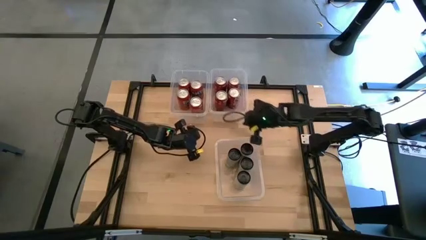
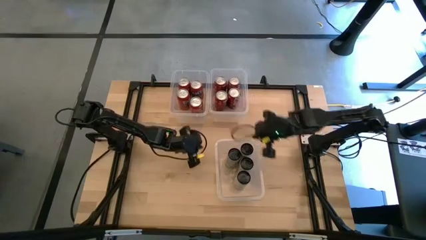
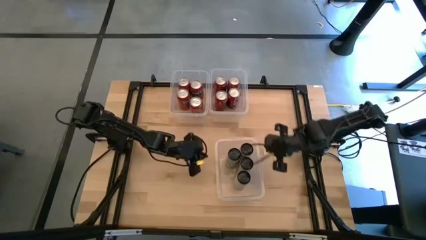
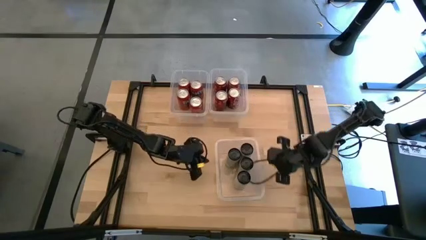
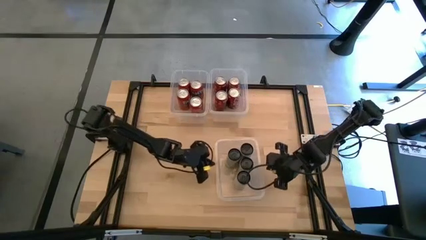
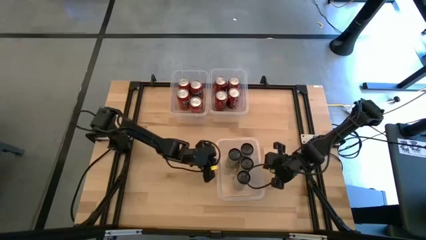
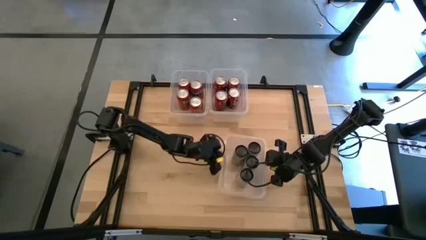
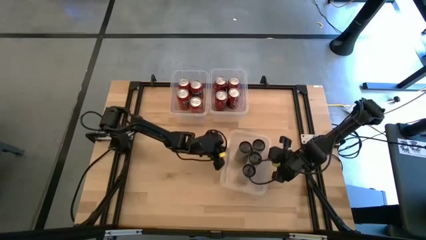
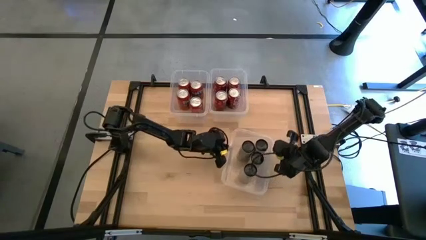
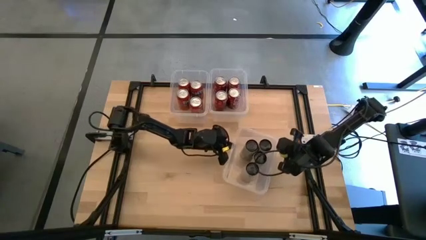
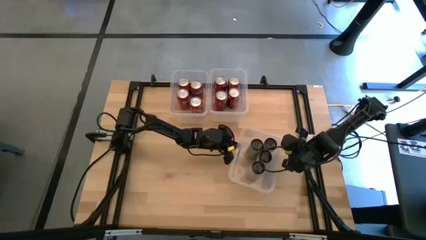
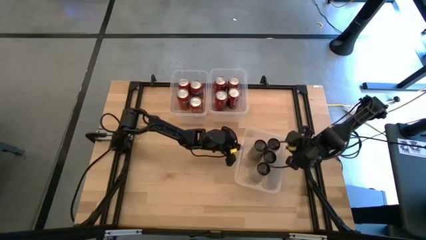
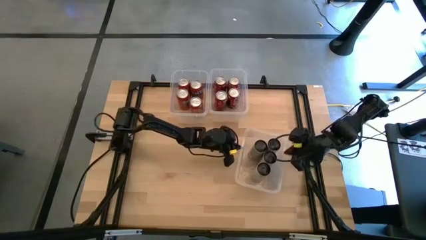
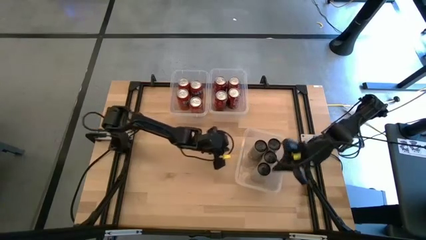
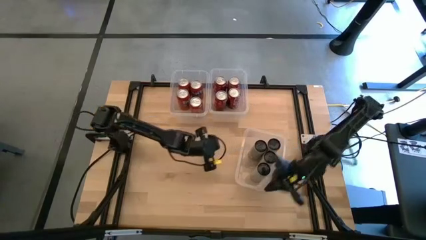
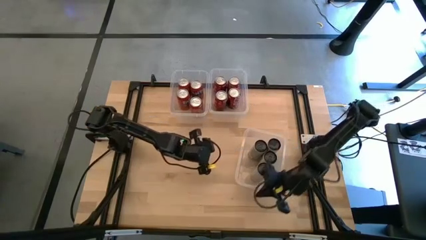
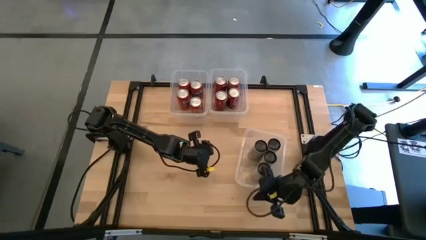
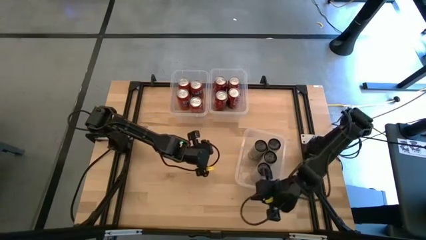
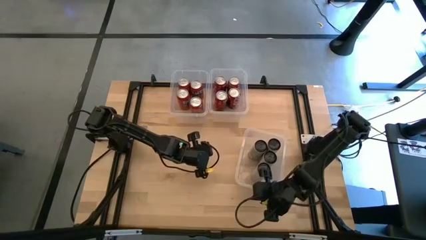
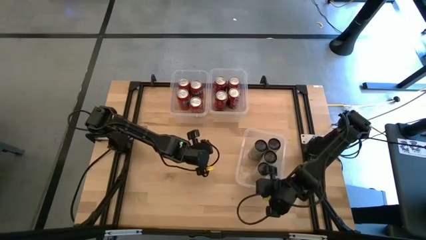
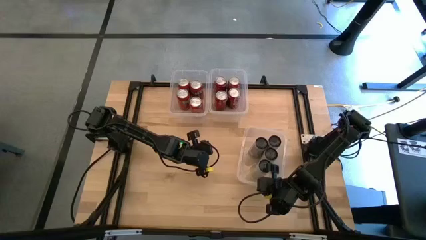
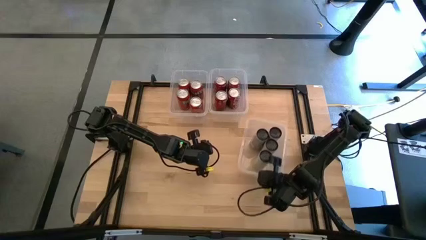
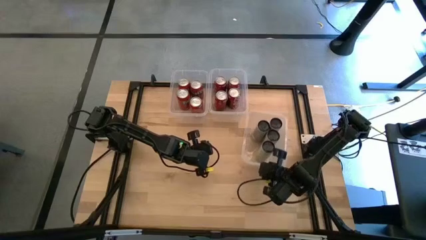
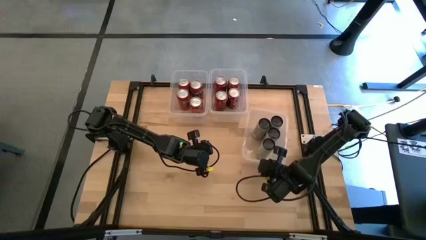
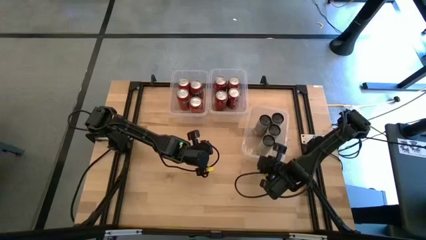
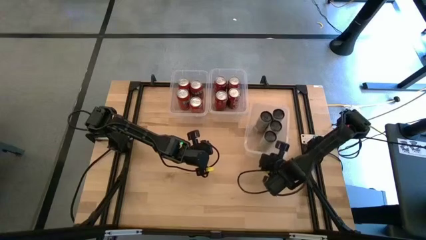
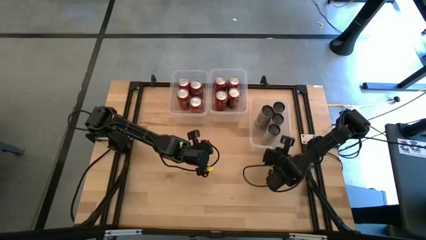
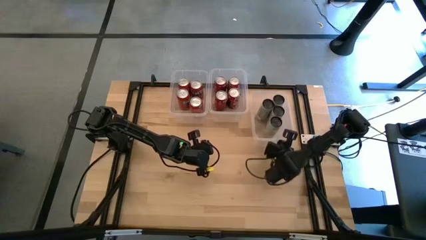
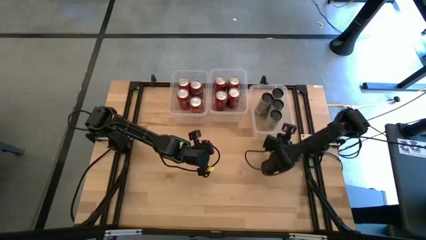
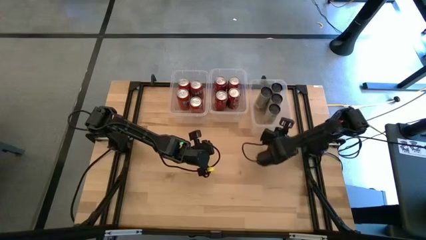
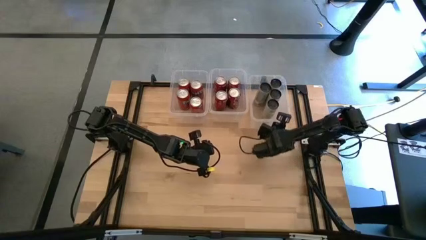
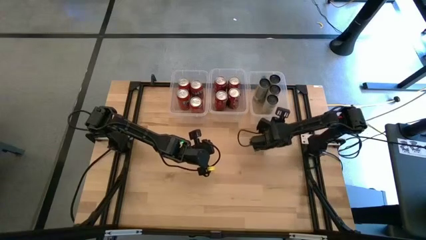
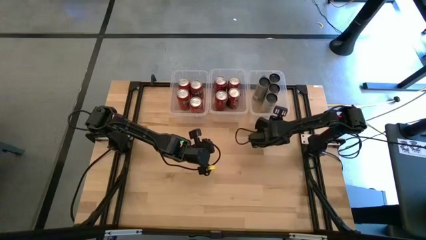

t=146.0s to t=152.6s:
Task: Sort soda cans
Move the bottom transparent bin to the top right of the table

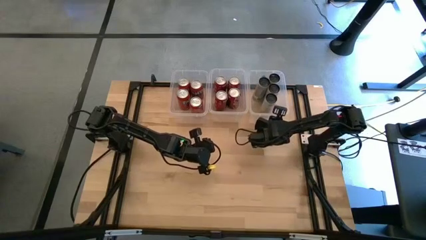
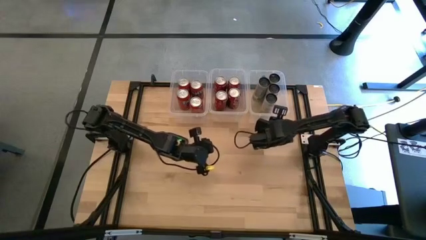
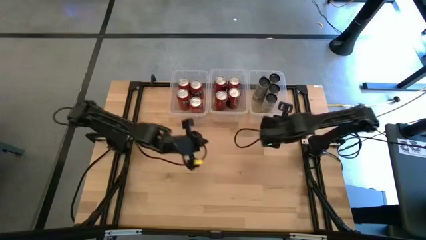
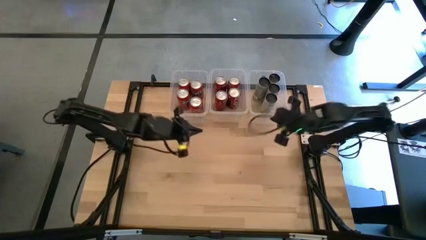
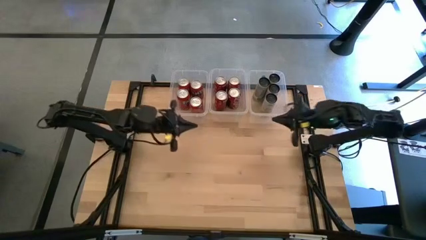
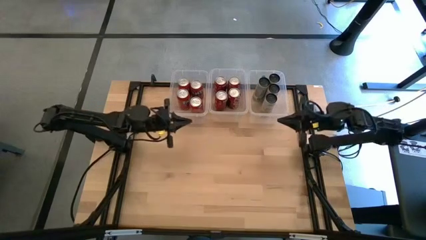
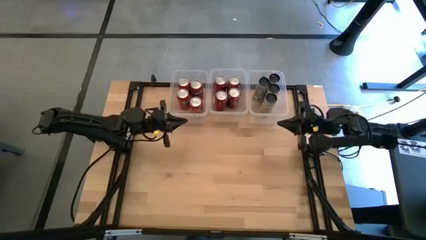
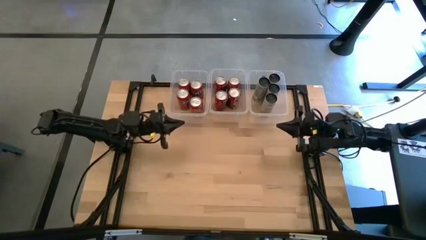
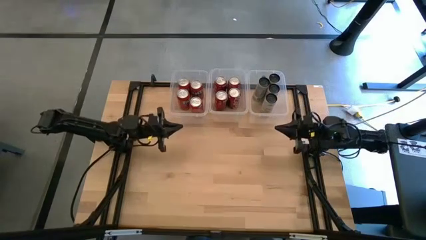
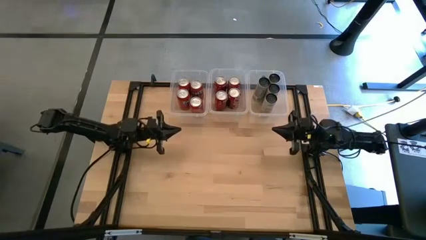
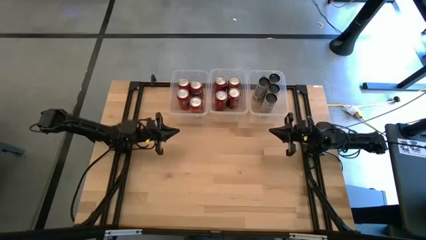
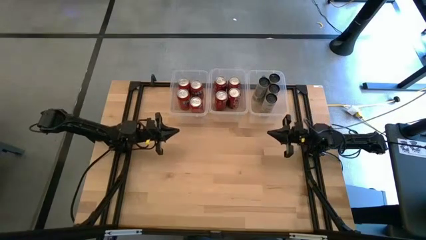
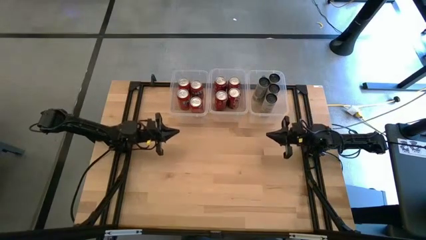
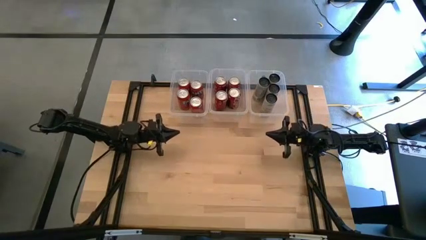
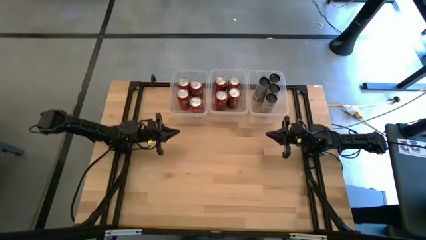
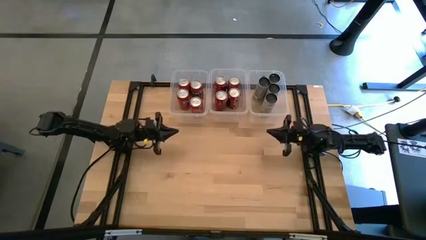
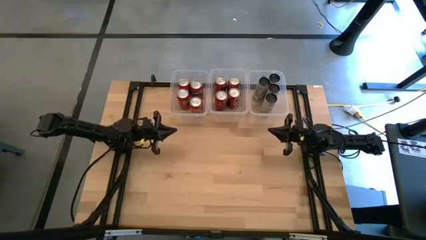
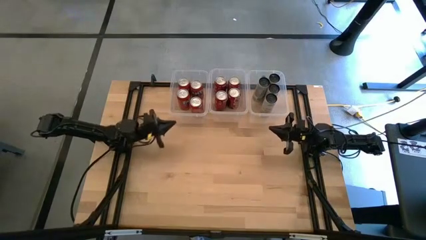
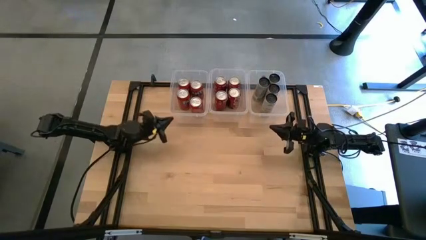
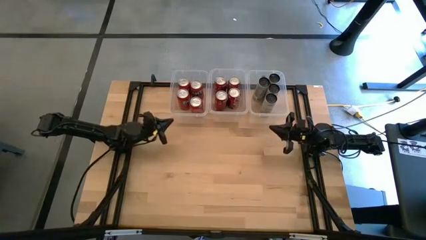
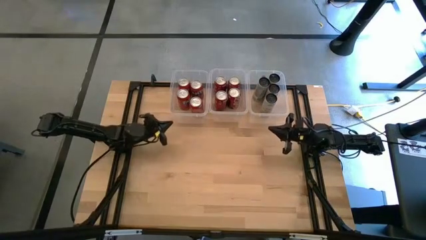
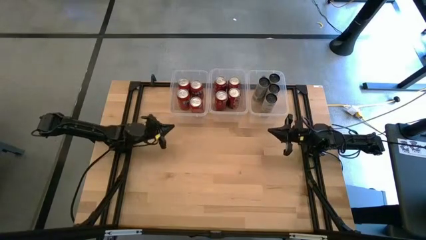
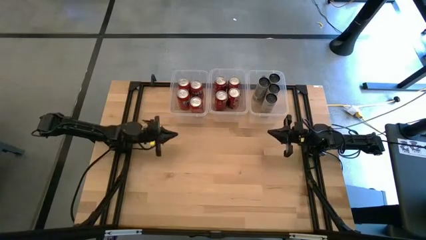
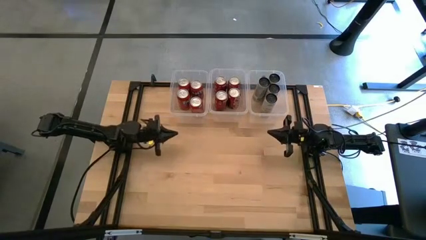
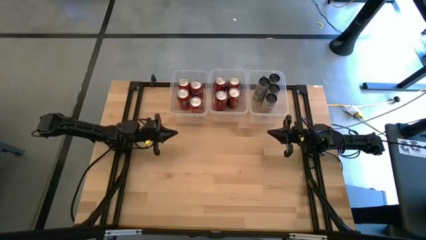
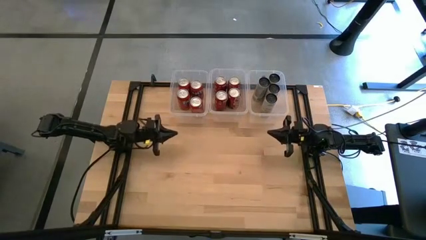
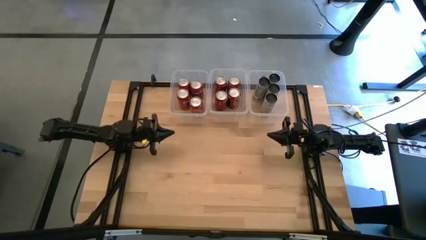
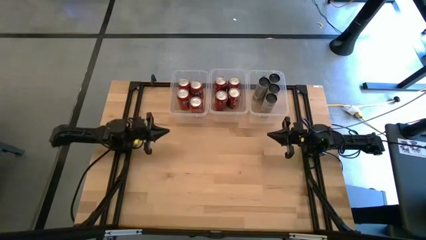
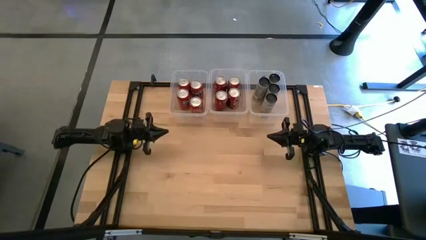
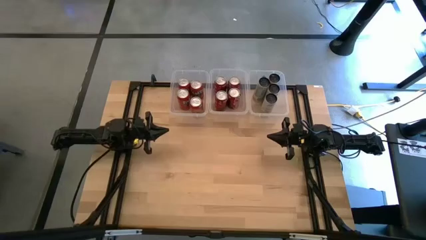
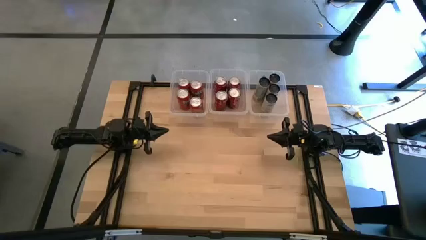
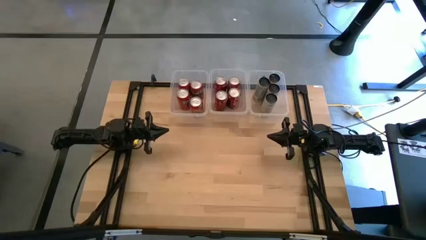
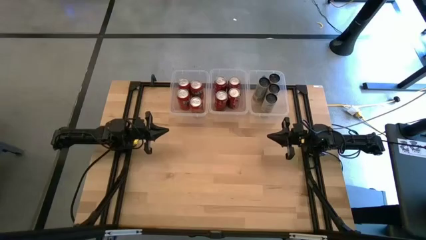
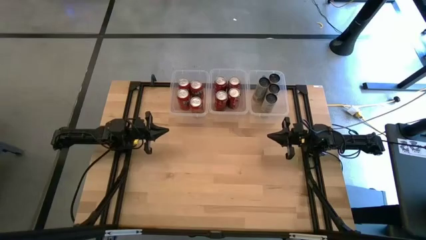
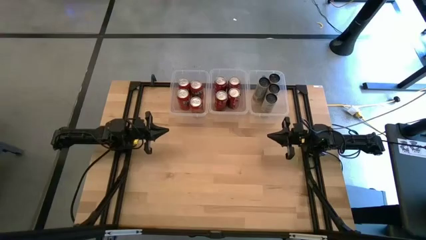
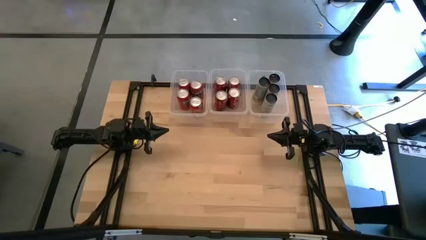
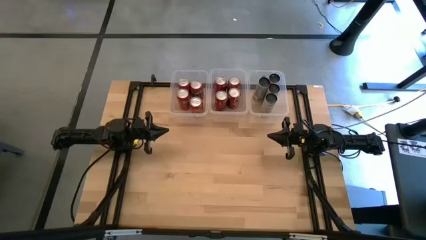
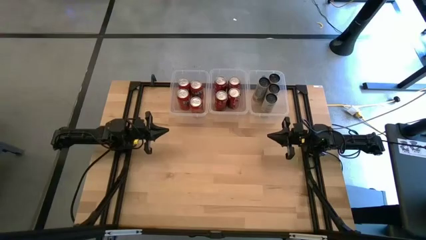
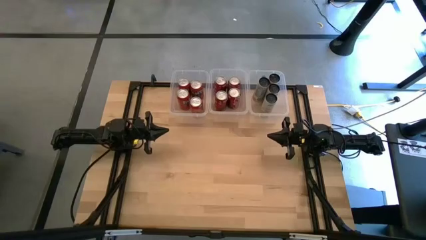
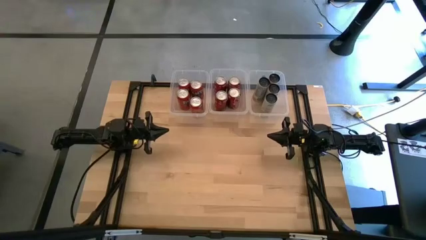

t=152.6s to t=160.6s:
Return to Home Position

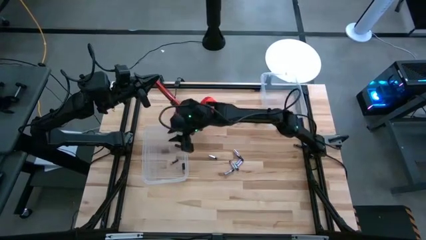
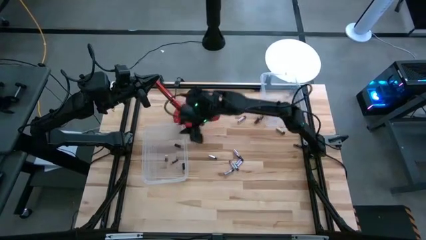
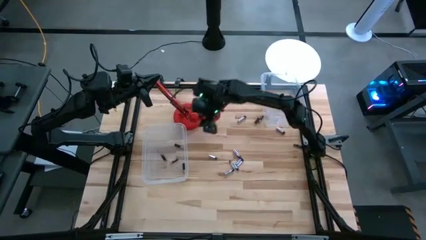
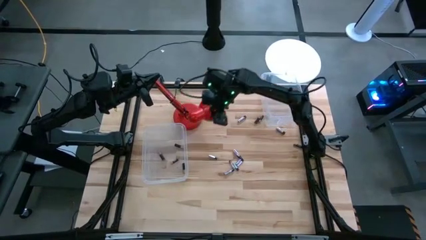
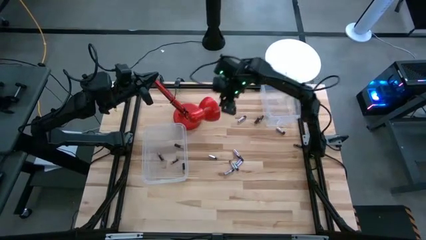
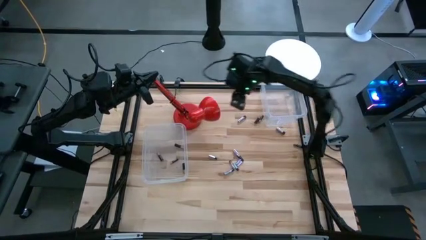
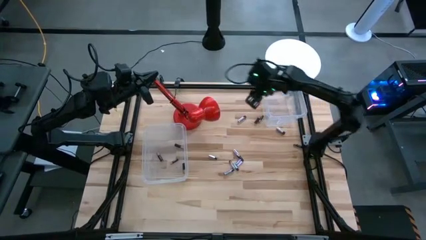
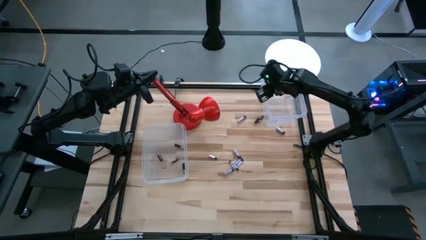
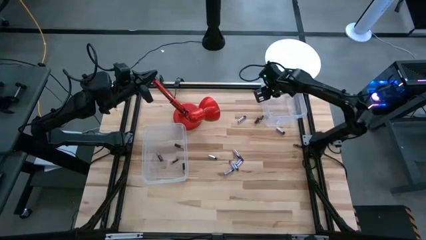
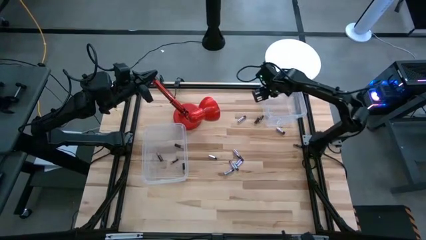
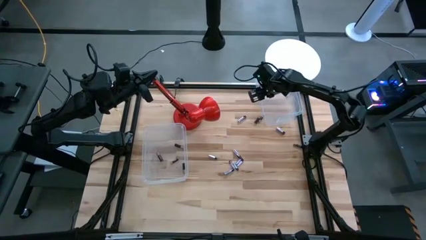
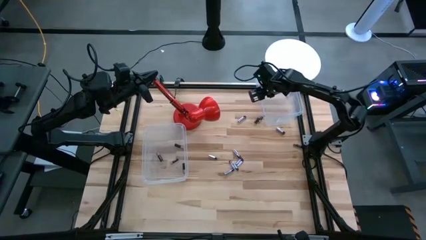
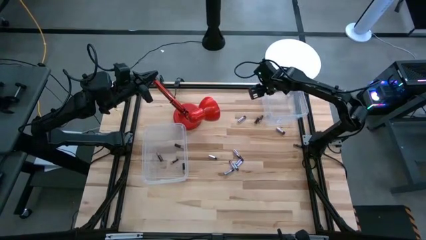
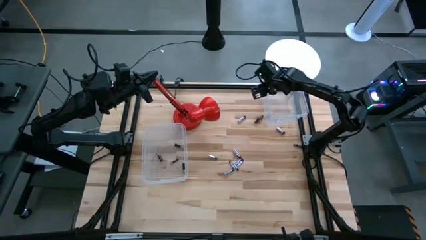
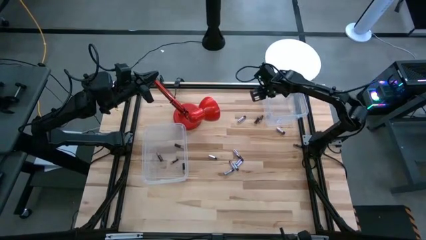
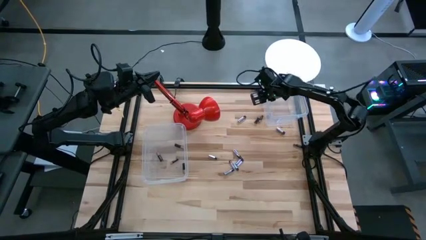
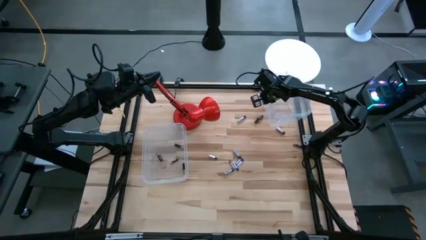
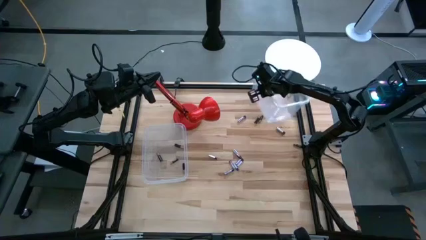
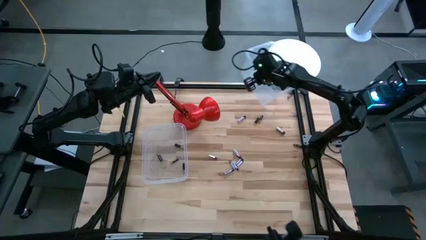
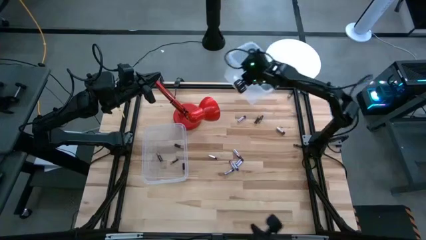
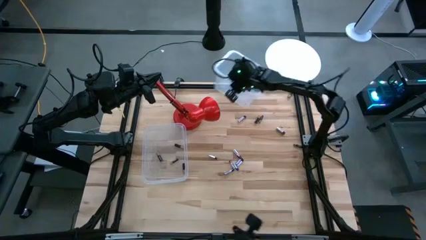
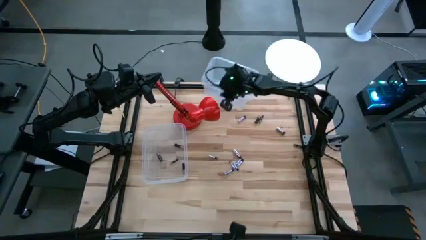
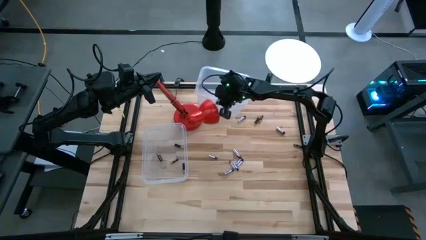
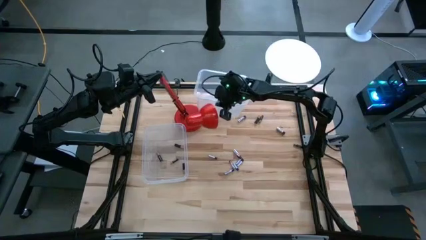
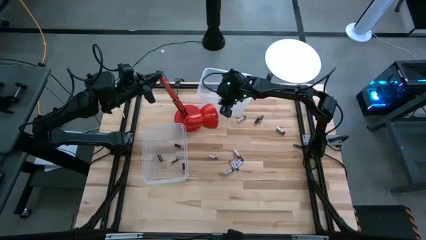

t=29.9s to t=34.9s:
Task: Sort batteries
Move the top transparent bin to the top center of the table
